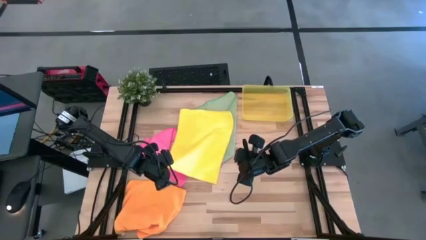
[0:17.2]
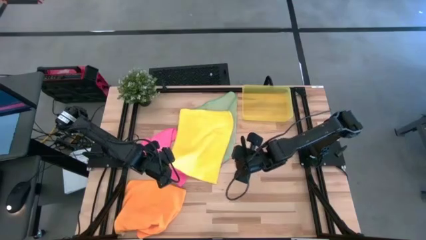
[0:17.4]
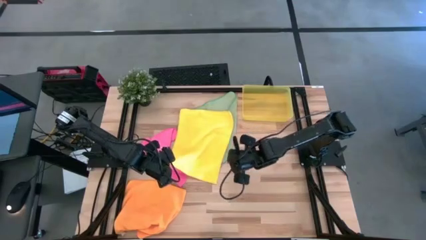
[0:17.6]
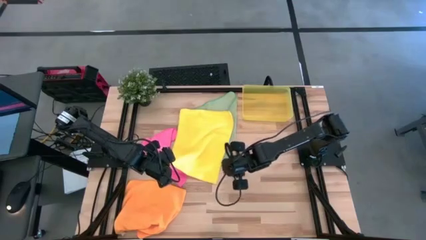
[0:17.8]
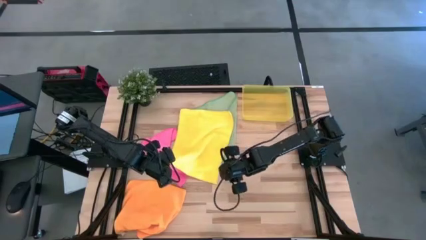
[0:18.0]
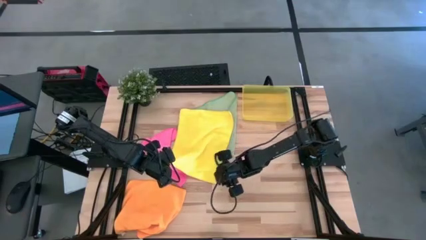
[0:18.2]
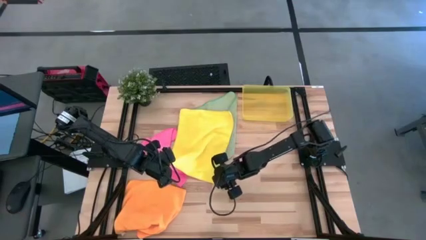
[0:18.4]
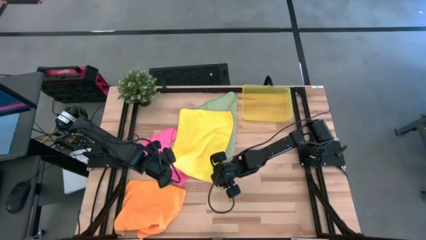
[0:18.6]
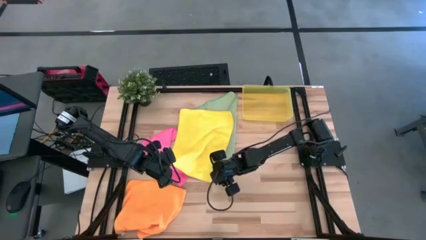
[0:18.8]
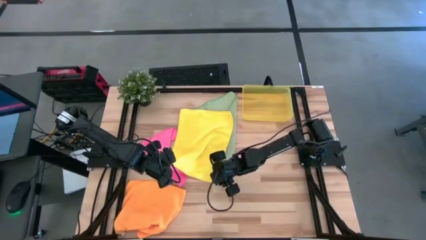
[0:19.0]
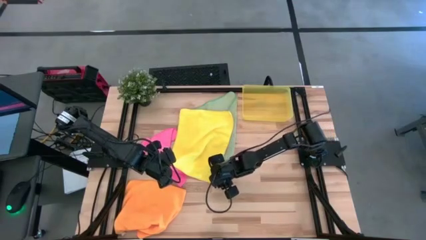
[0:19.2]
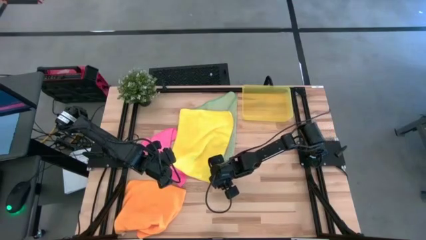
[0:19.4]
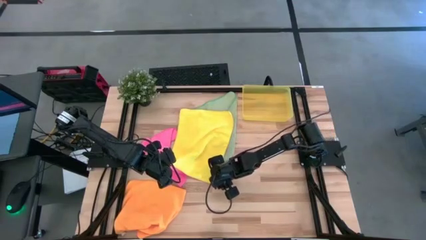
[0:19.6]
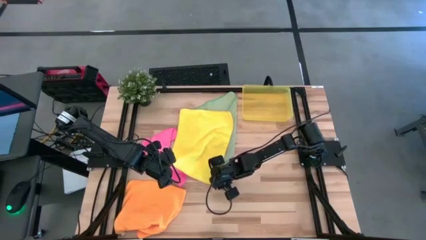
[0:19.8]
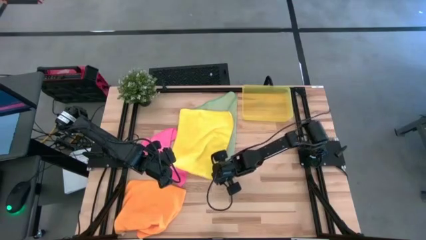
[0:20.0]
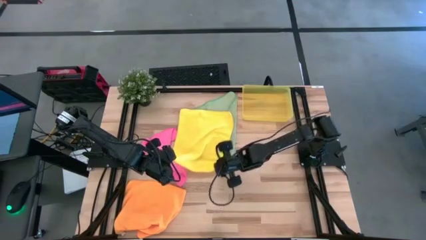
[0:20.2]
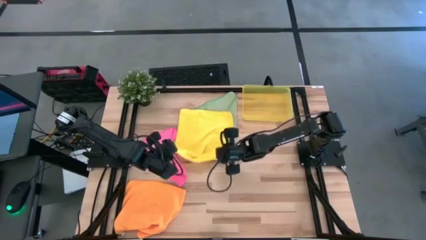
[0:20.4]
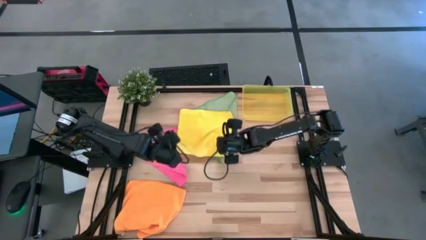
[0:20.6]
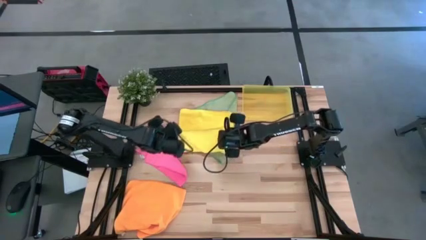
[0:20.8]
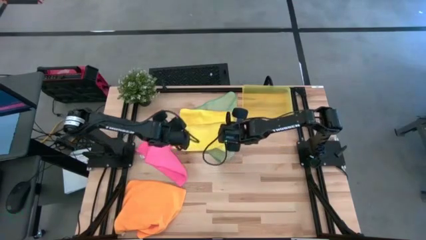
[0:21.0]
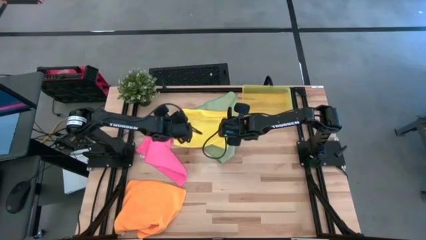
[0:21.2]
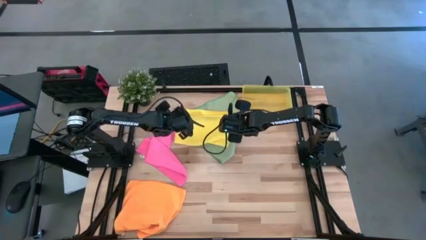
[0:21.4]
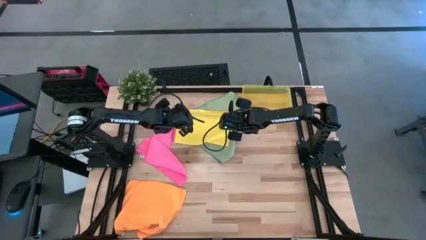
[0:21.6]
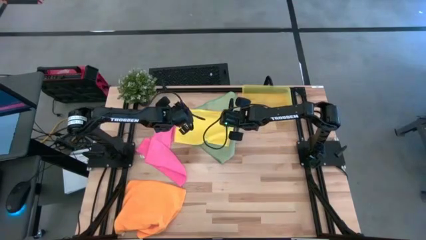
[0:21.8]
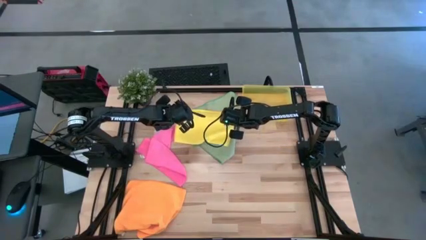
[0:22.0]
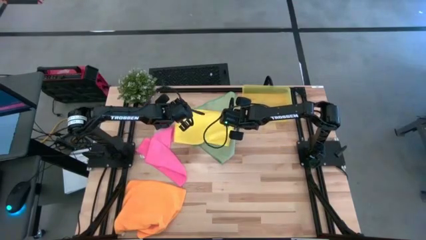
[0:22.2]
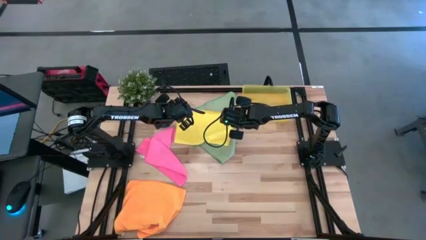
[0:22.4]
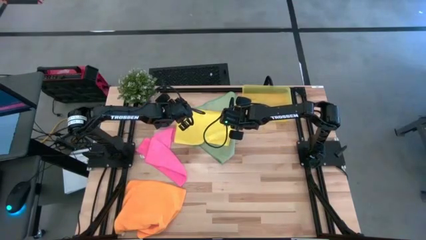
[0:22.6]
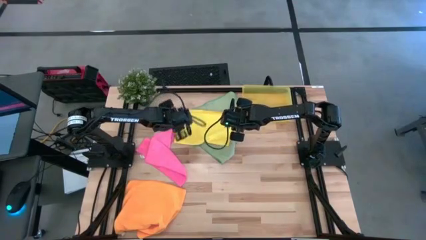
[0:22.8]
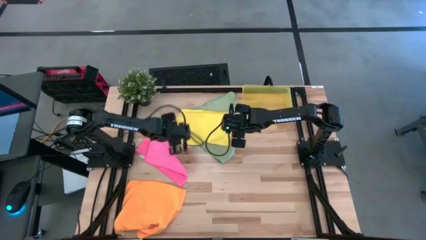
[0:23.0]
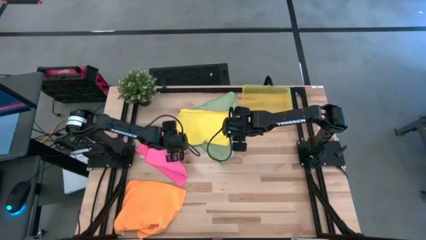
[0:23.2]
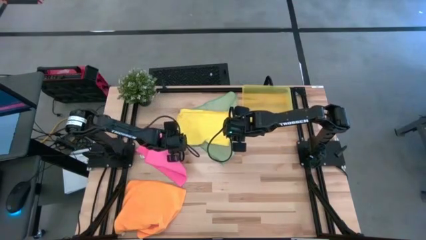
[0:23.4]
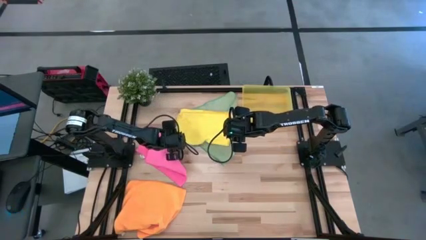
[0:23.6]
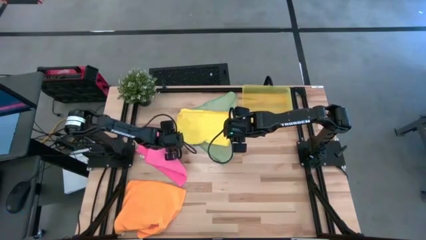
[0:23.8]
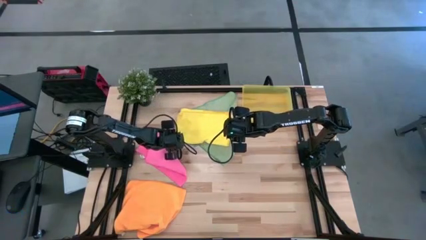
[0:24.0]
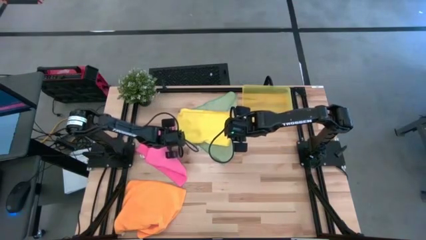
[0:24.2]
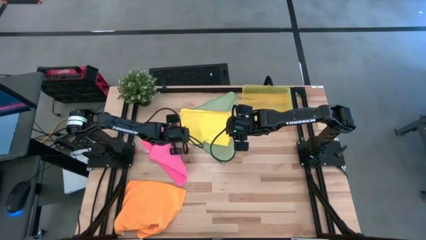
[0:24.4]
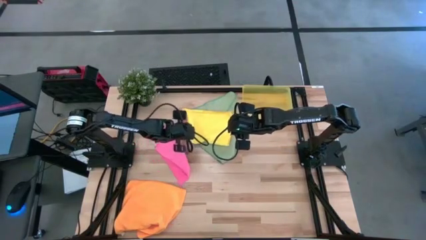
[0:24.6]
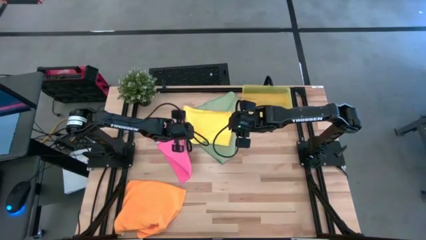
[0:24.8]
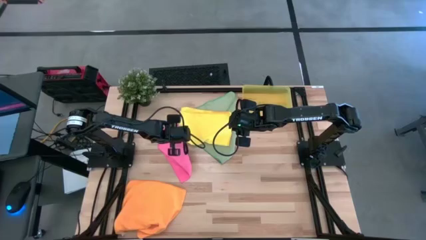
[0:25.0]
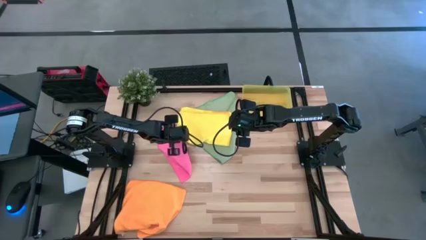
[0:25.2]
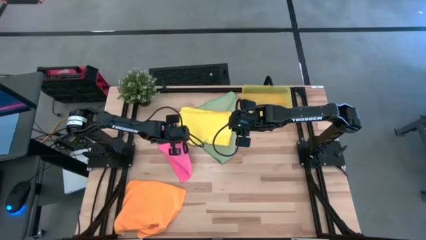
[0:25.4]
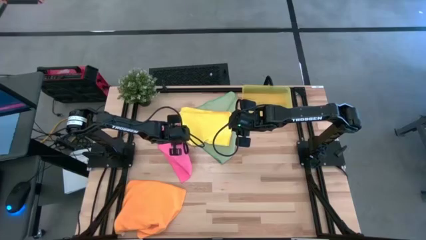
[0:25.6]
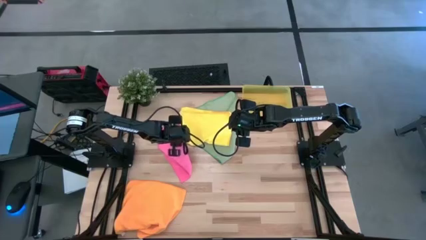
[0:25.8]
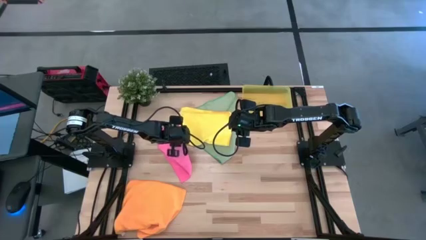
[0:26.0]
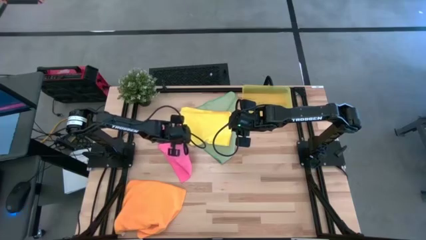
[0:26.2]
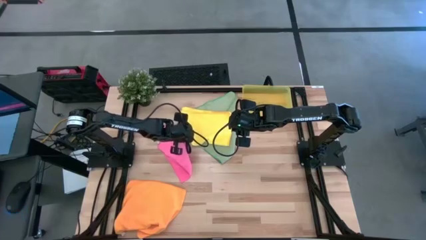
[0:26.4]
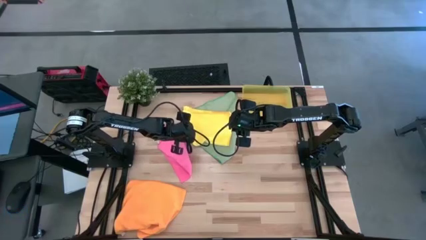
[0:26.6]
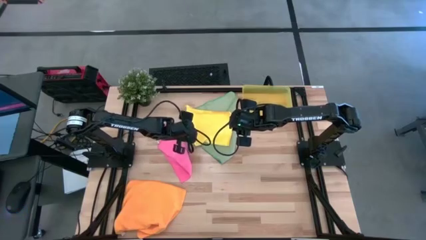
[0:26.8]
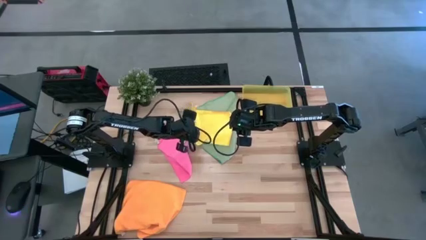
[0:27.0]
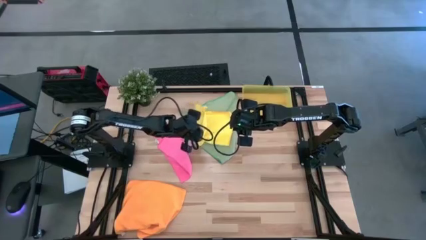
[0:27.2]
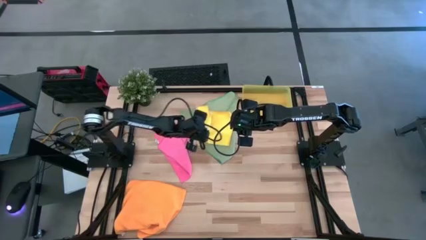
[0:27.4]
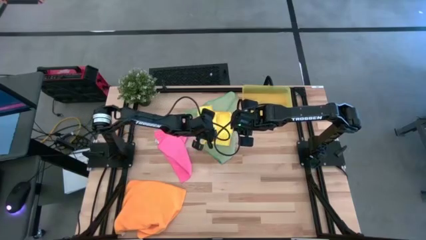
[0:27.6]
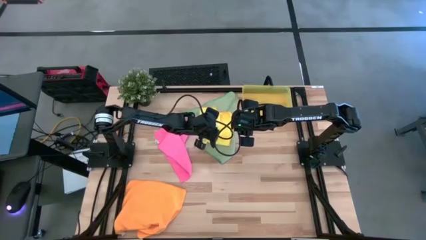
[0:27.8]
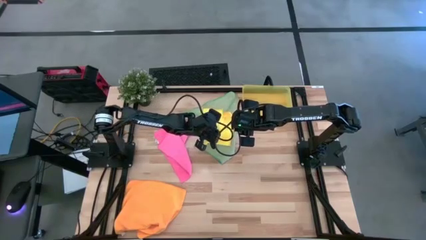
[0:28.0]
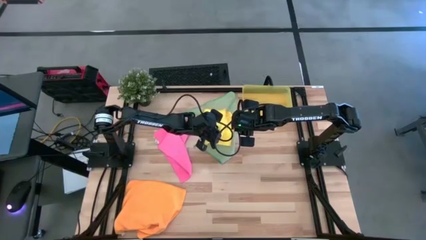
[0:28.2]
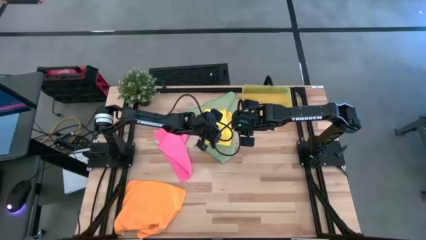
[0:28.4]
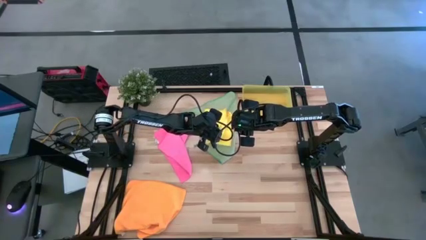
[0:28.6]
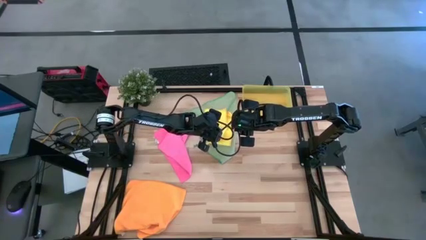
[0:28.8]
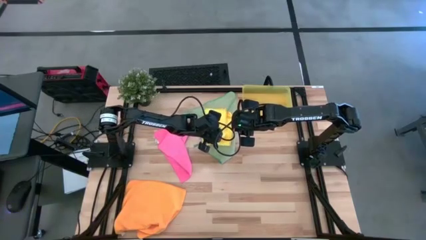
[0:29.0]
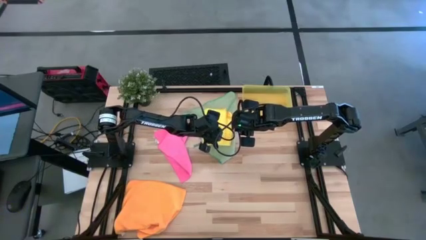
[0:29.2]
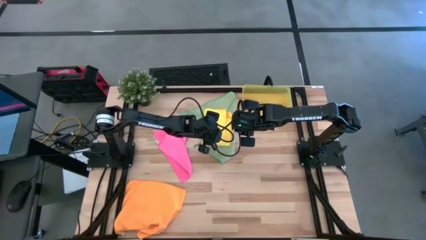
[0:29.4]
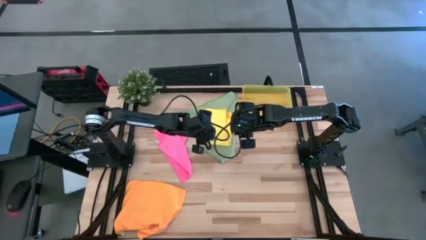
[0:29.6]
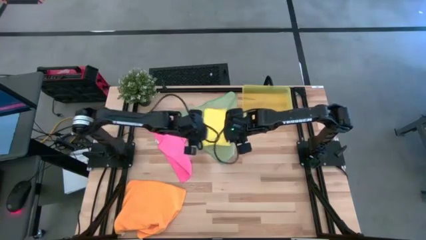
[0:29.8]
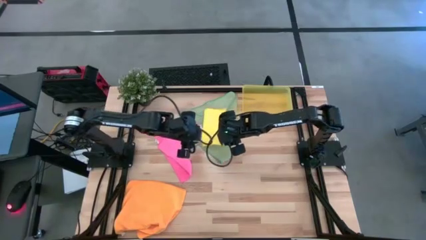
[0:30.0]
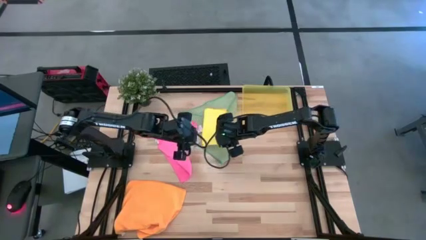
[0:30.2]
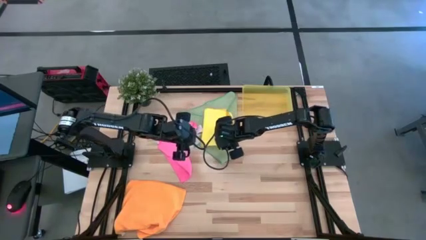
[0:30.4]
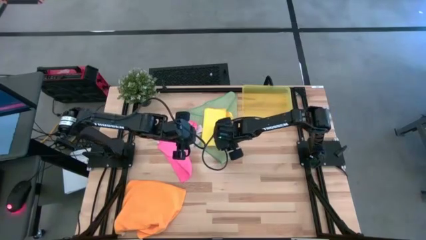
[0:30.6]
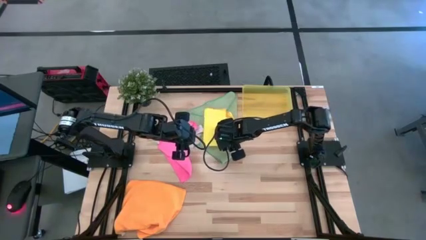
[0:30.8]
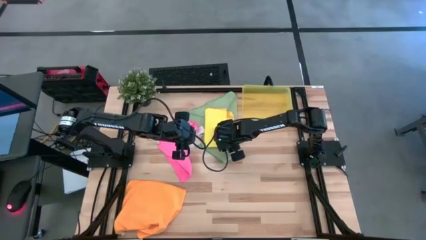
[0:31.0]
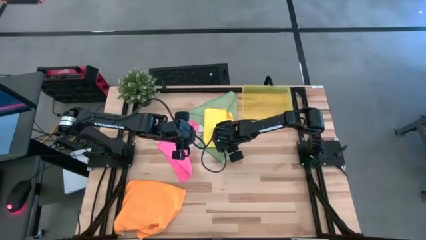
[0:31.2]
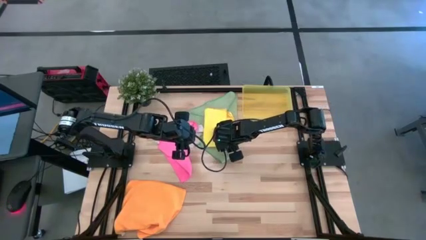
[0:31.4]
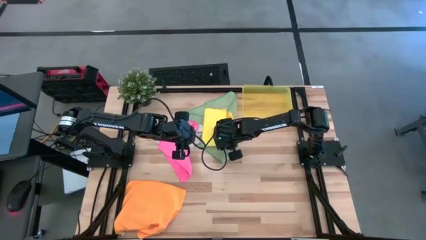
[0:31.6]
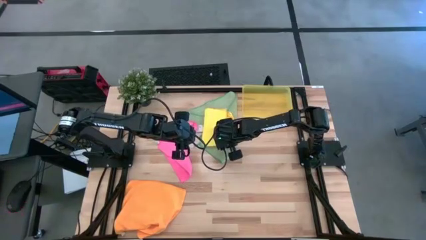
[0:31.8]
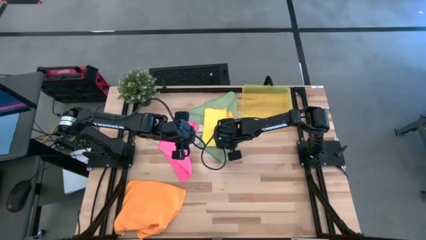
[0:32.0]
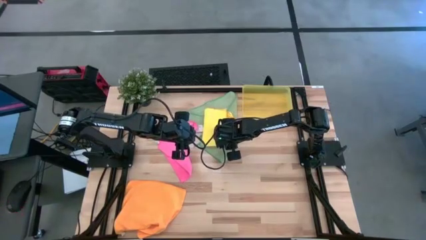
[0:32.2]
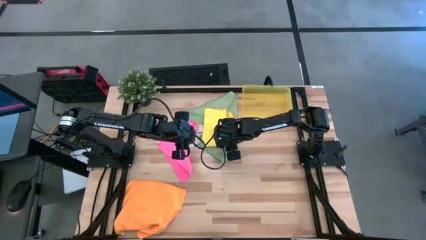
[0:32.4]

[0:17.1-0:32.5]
Task: Fold microfiber towels
Fold the yellow towel

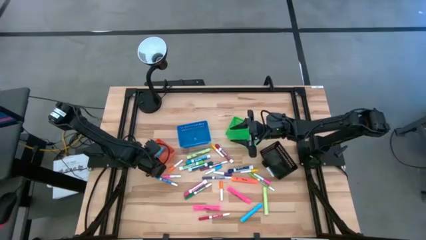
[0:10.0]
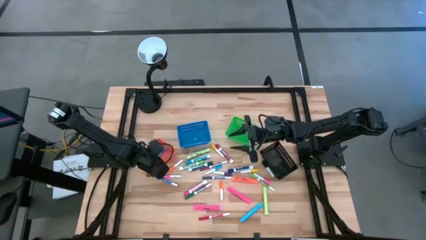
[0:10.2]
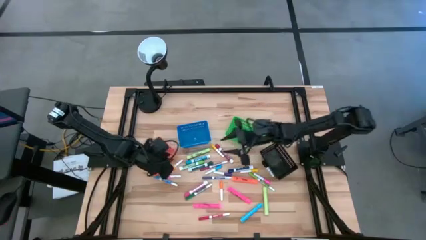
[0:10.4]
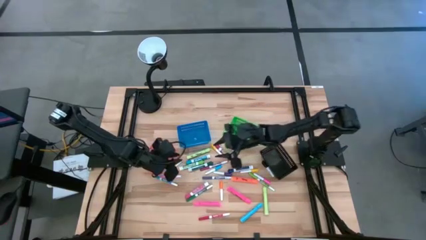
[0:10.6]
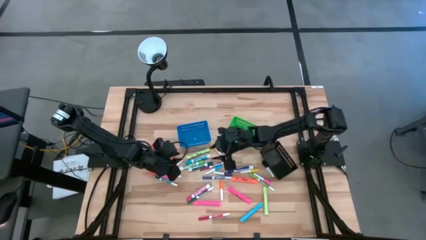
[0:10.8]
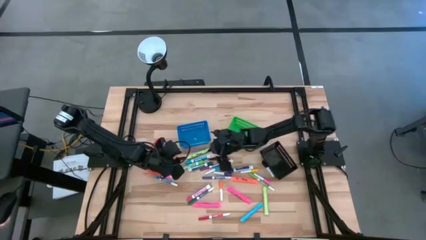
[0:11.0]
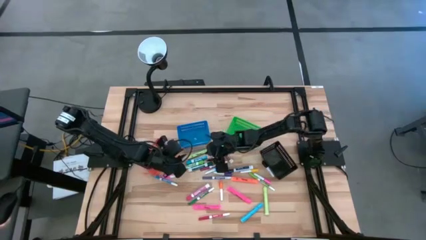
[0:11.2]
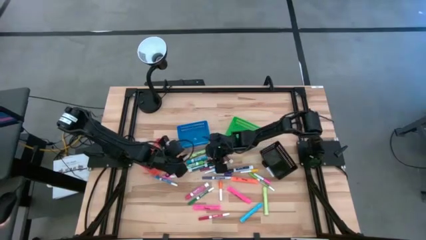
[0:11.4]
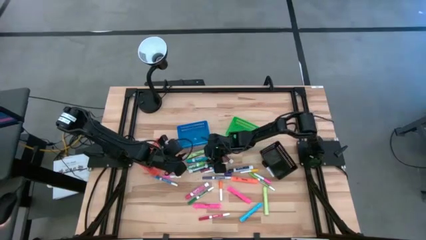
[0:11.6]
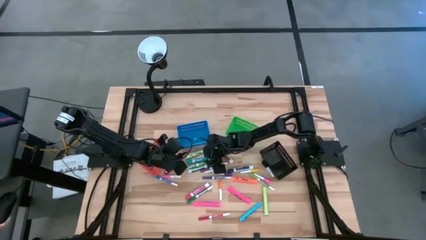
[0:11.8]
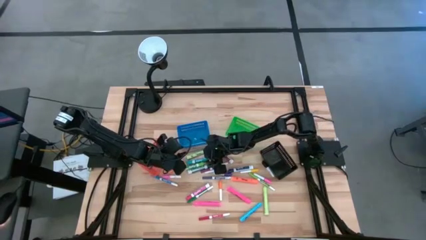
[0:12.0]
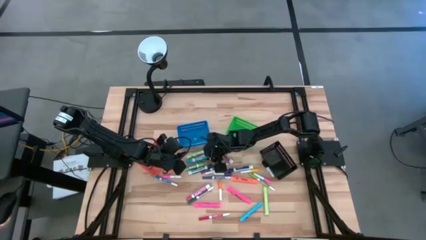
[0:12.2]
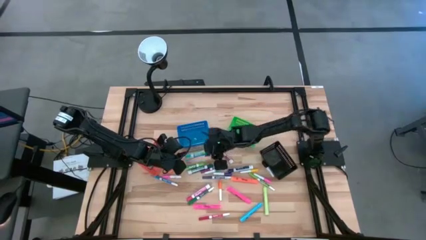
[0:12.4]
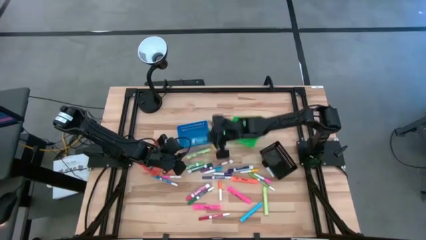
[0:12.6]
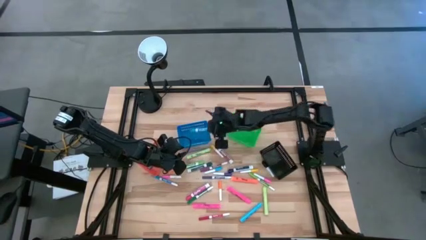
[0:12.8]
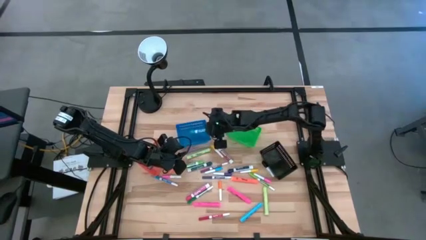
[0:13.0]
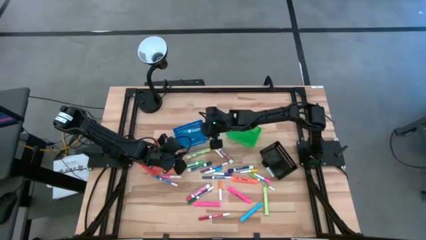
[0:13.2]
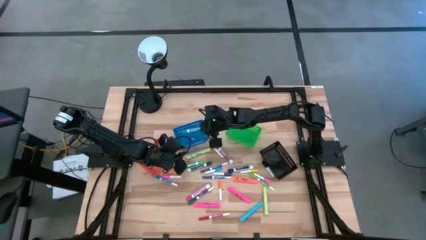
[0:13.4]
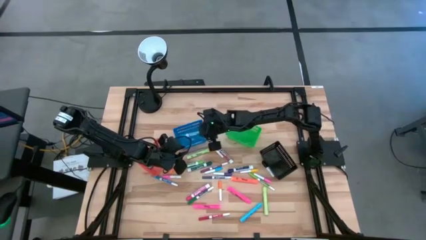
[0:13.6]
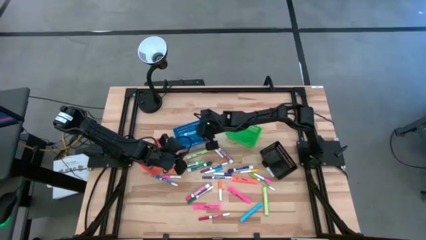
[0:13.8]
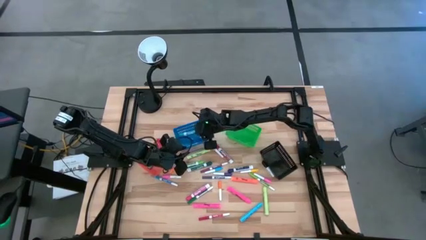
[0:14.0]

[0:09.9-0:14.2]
Task: Pick & Place Markers
Put the light blue marker pen into the blue basket
